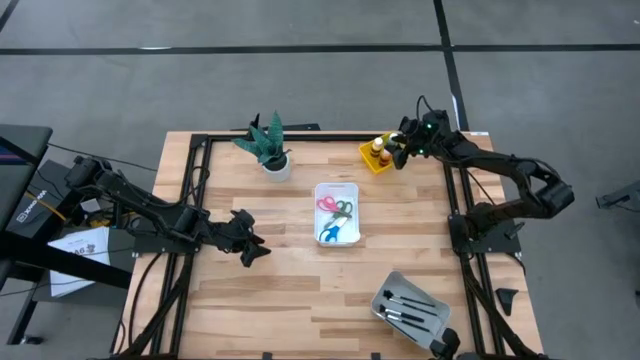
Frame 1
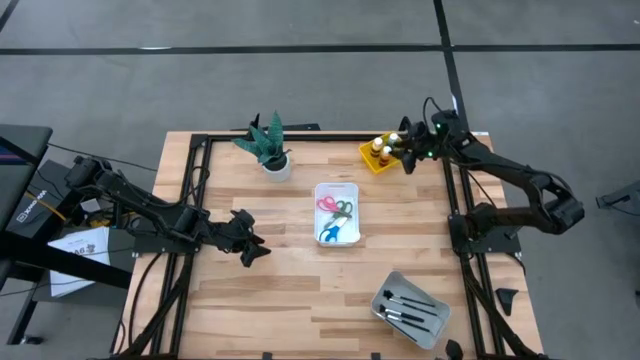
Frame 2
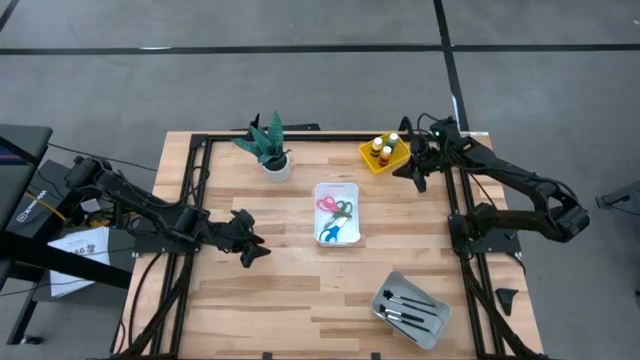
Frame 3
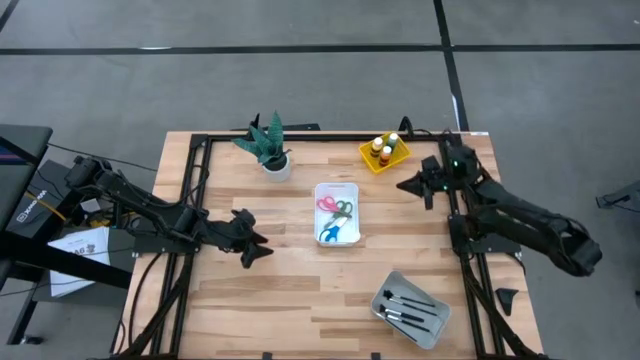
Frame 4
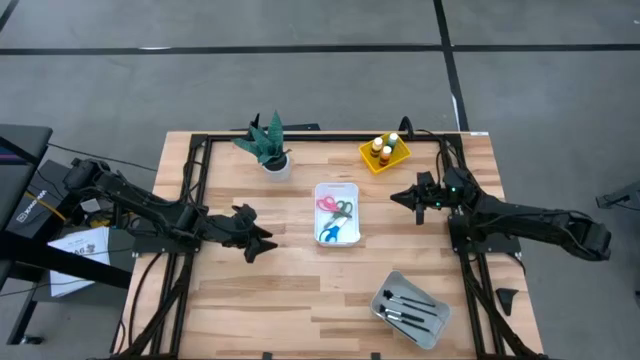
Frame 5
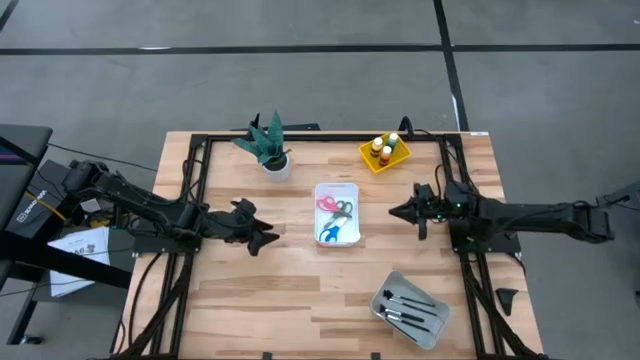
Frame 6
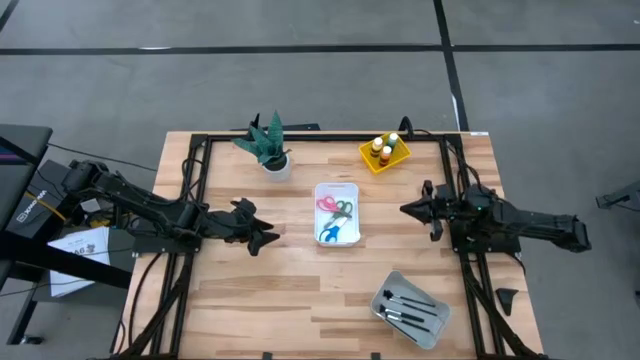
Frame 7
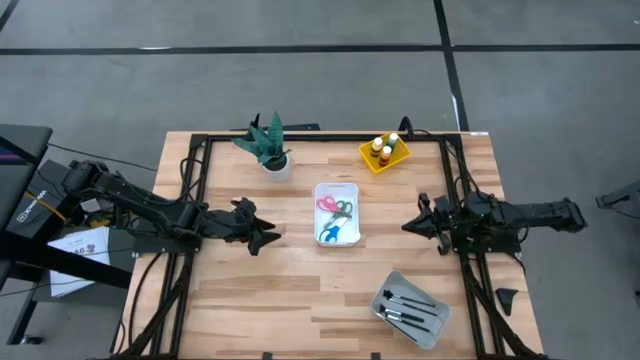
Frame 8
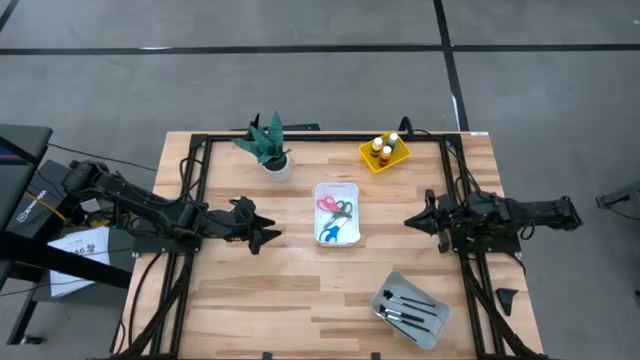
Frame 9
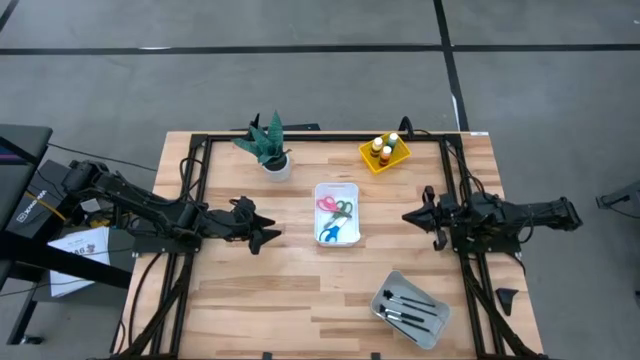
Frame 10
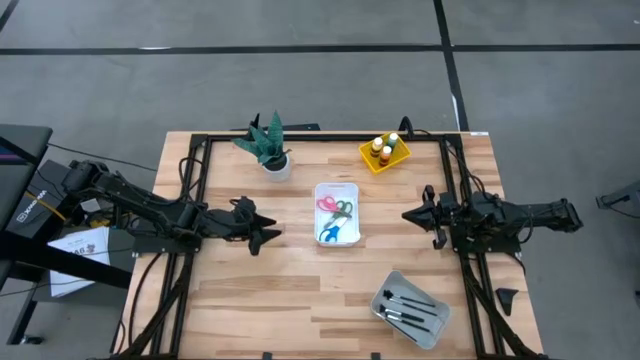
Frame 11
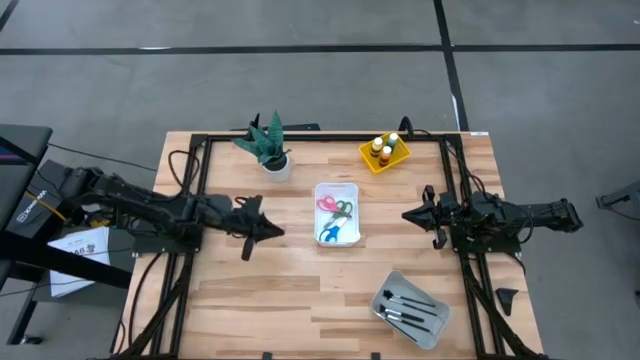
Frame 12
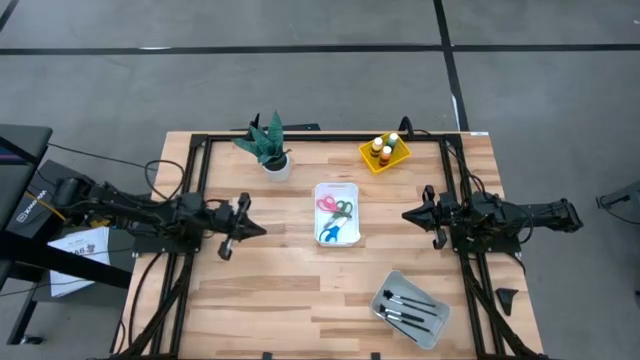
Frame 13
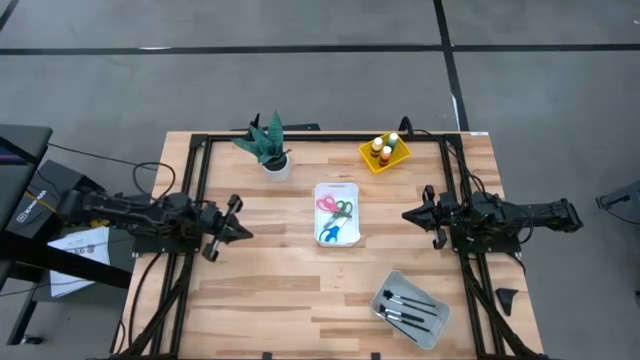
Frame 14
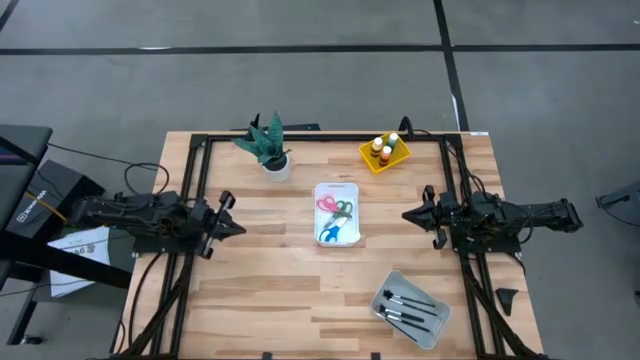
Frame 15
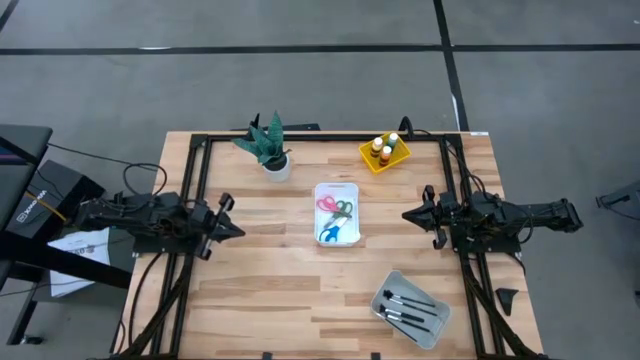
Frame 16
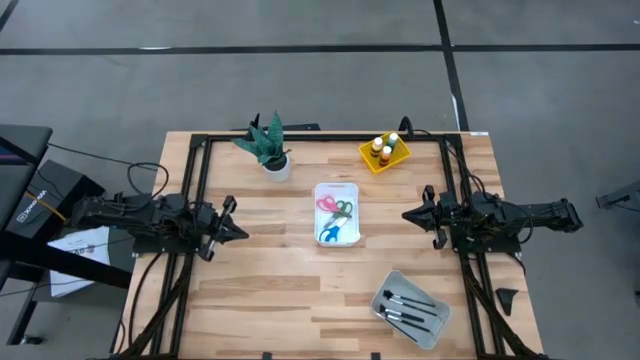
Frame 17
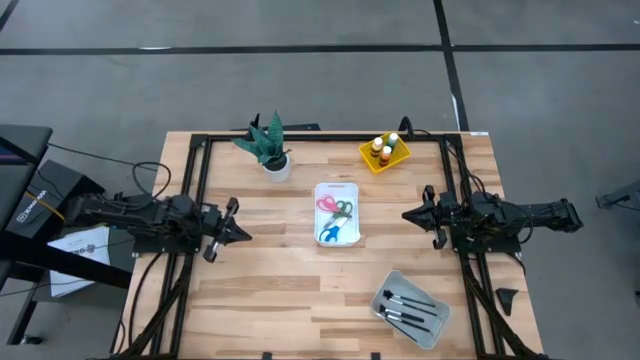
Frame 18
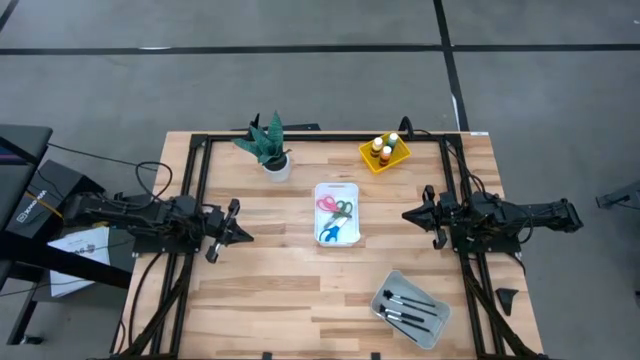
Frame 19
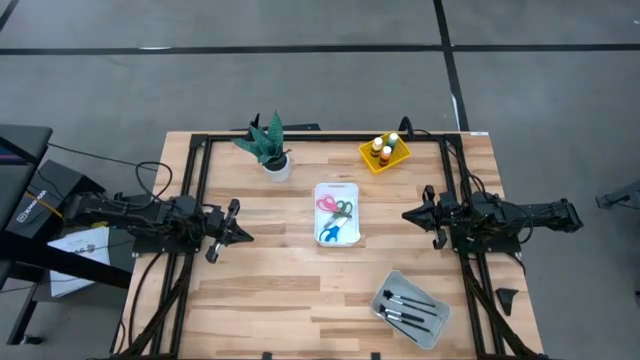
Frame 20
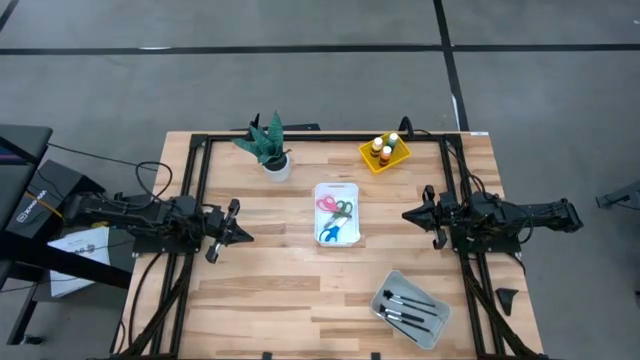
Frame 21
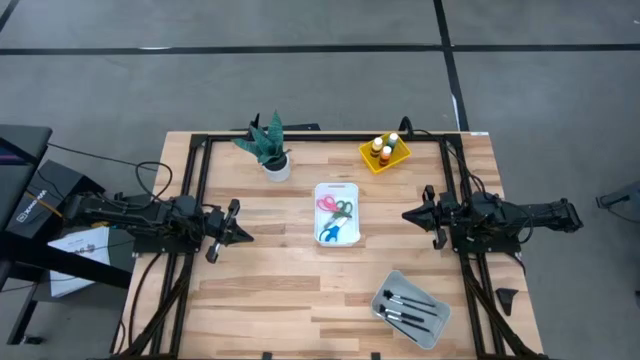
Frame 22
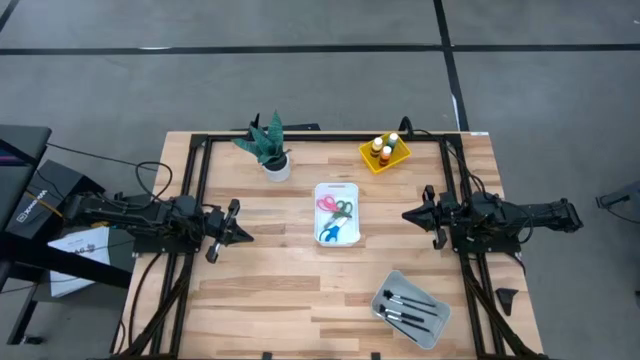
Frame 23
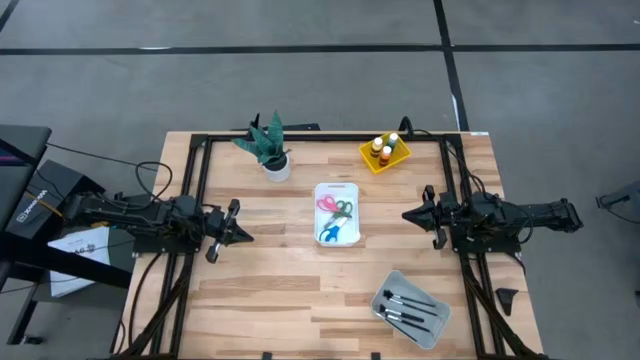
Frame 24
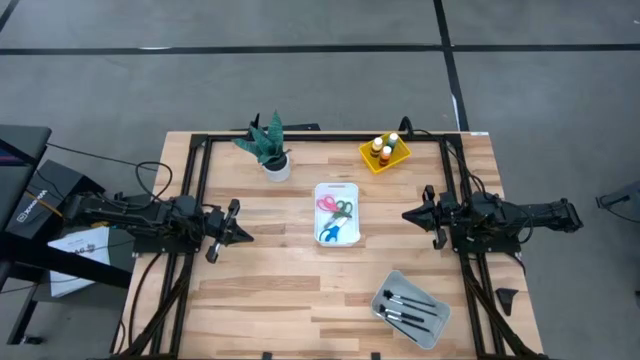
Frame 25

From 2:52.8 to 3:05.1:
Task: Pick & Place Paint Supplies
Return to Home Position

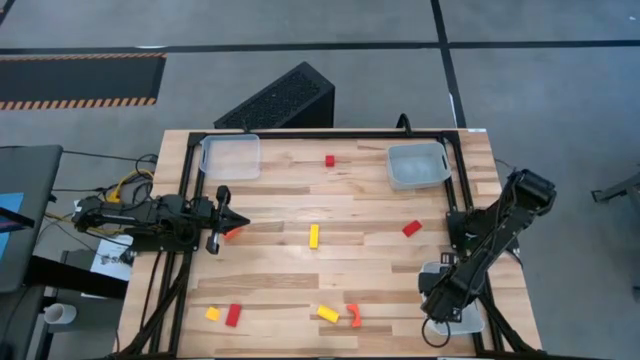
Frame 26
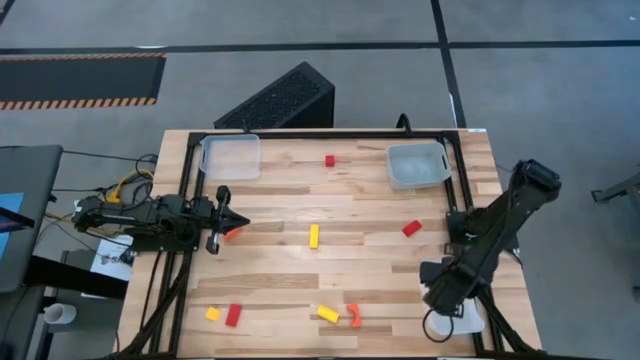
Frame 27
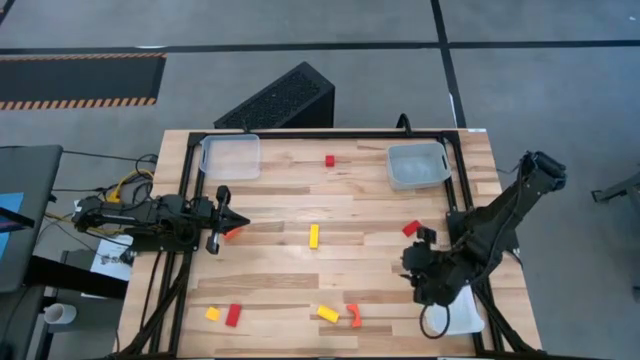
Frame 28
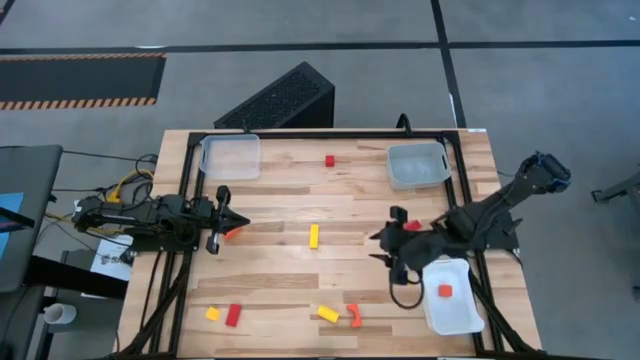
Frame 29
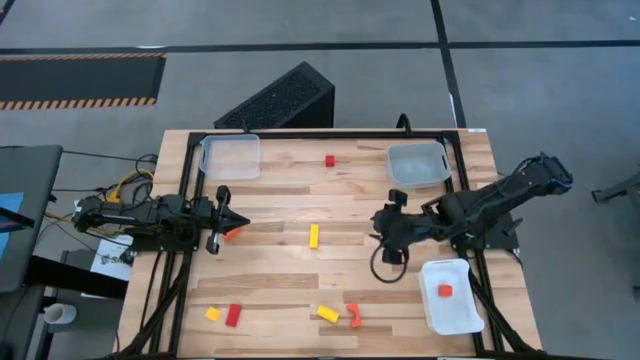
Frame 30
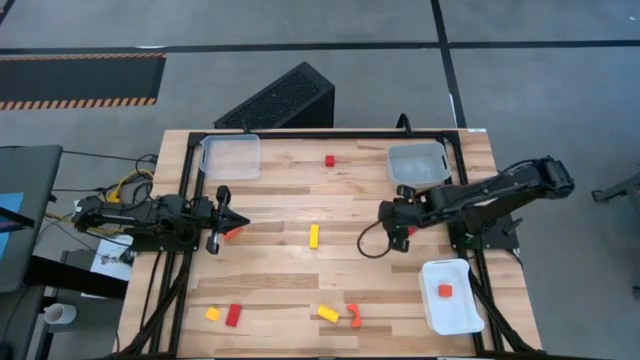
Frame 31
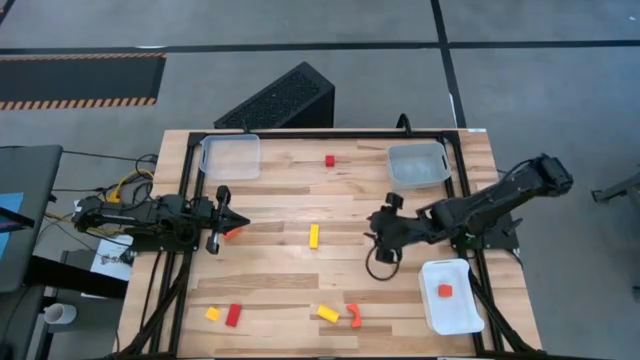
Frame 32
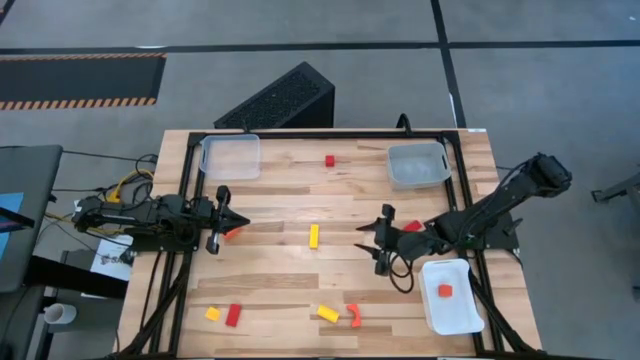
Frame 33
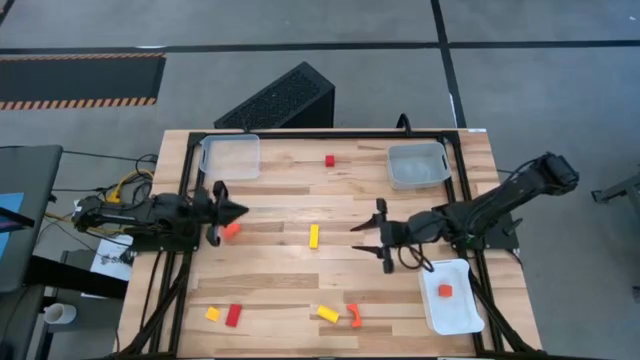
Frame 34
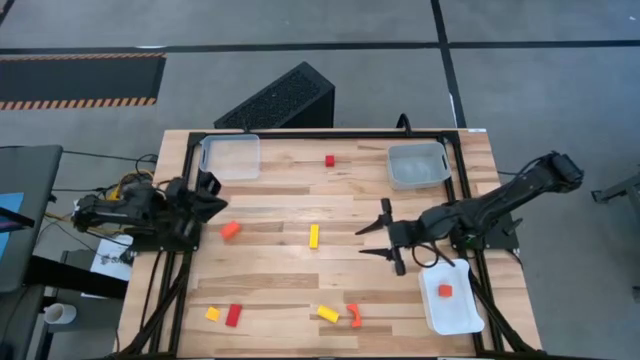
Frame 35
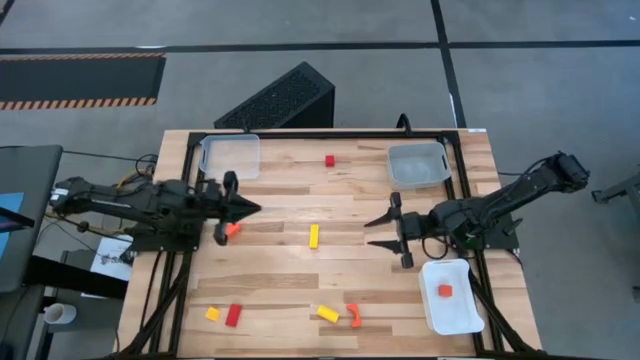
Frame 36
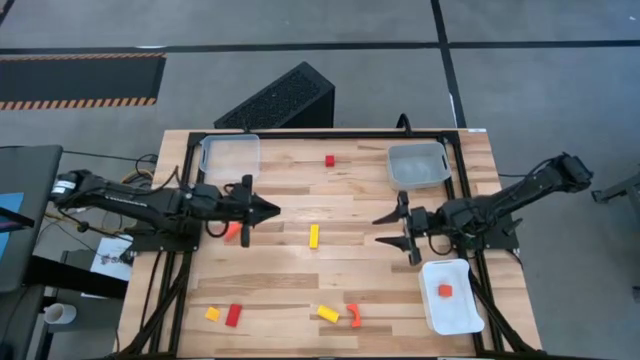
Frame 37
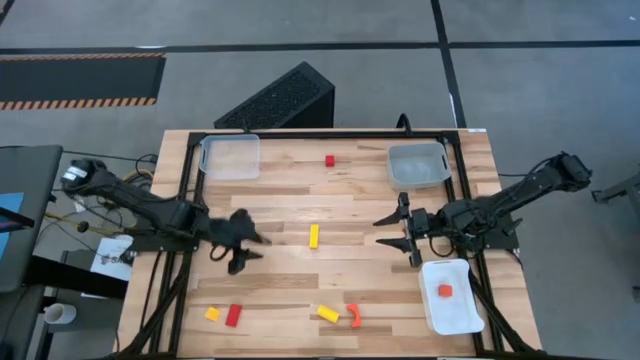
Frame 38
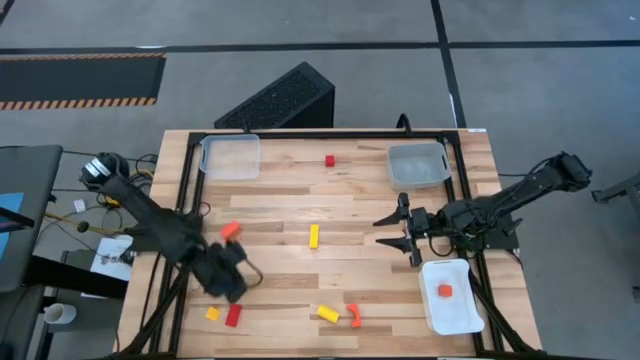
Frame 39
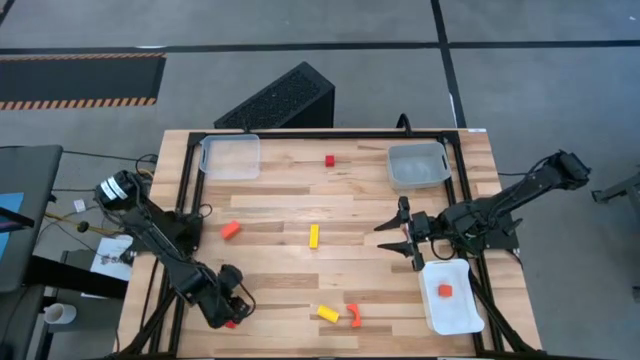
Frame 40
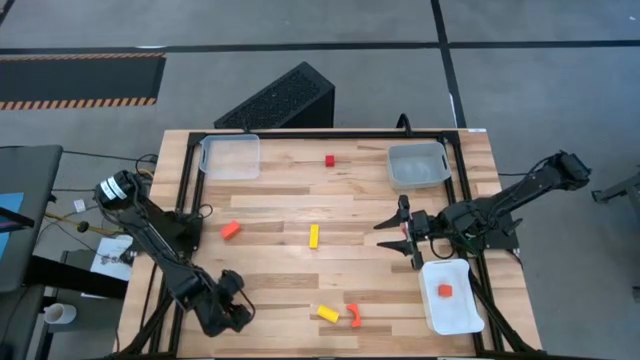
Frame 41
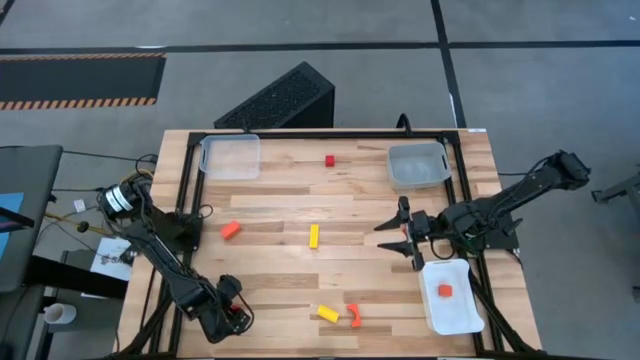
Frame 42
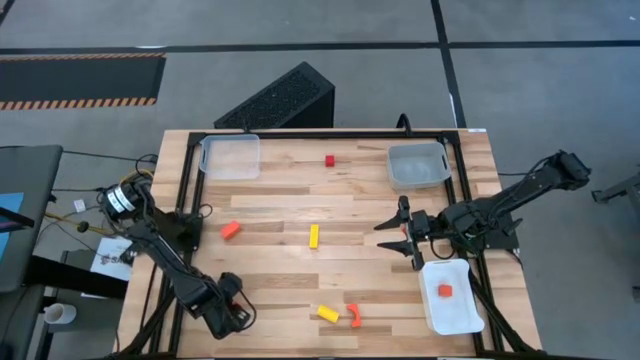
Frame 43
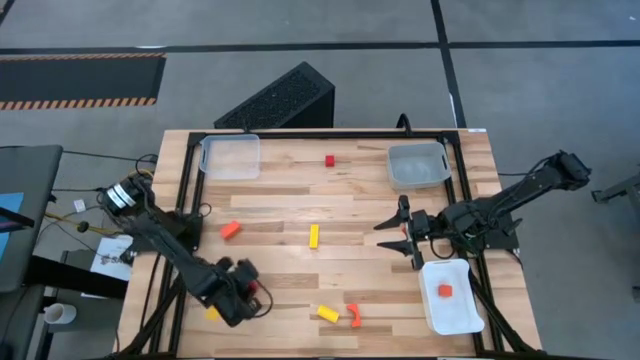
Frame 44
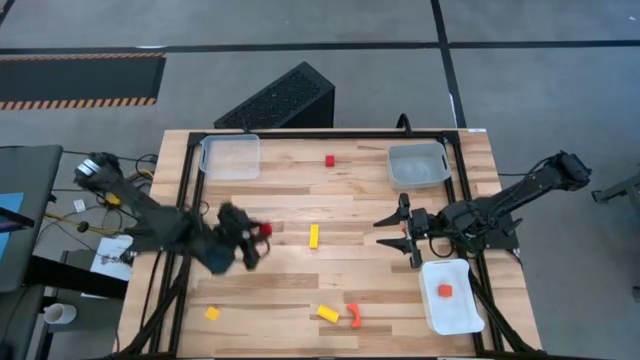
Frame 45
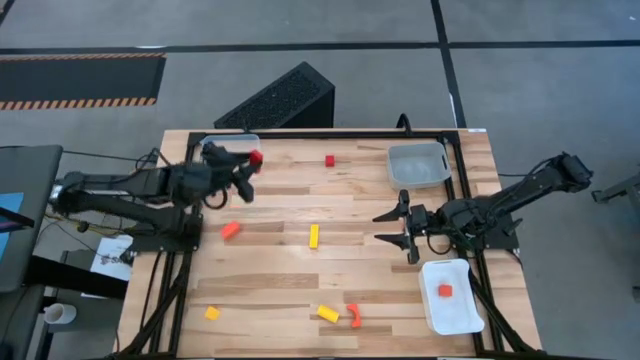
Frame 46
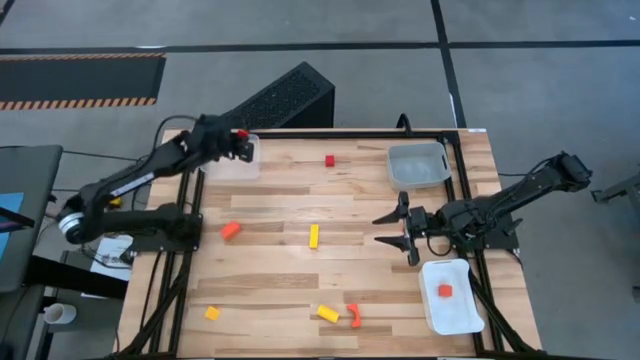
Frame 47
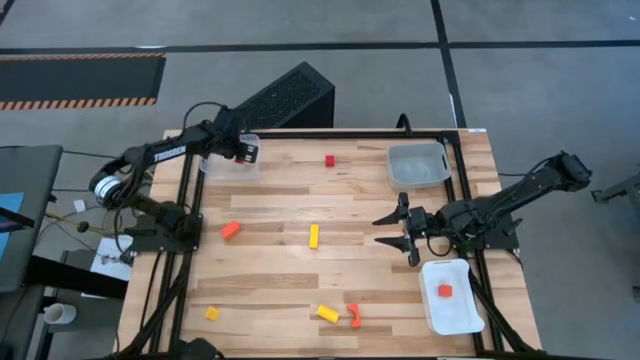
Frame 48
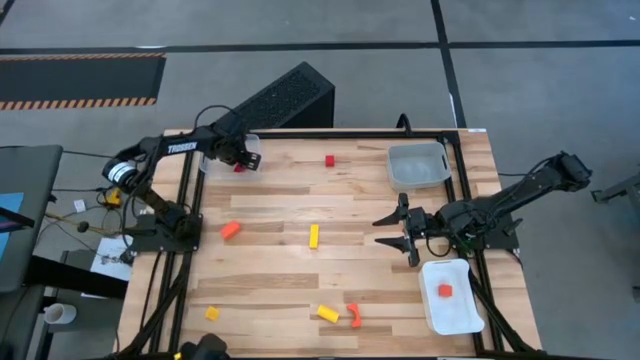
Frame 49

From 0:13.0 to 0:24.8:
Task: Sort & place blocks by color
Put the bottom left red block into the transparent bin
